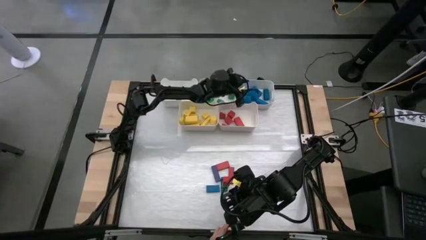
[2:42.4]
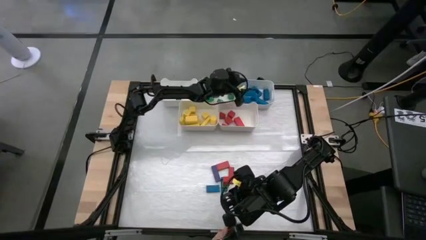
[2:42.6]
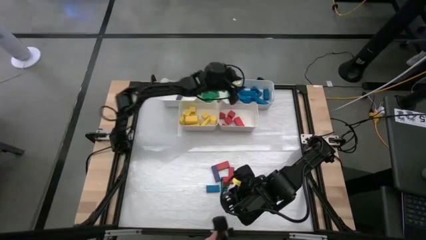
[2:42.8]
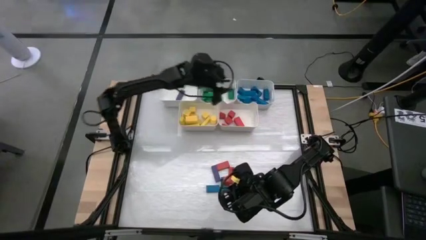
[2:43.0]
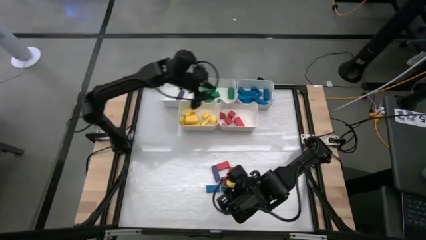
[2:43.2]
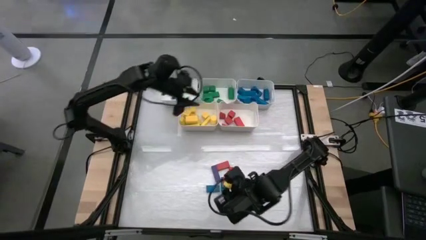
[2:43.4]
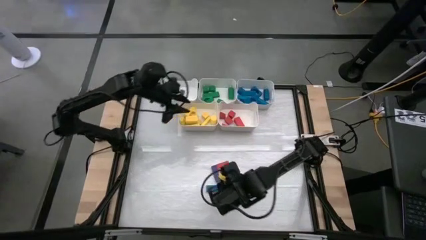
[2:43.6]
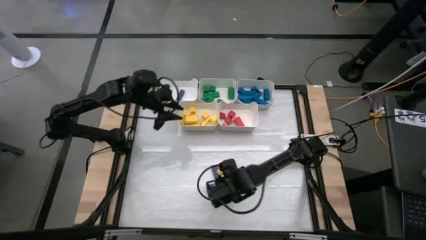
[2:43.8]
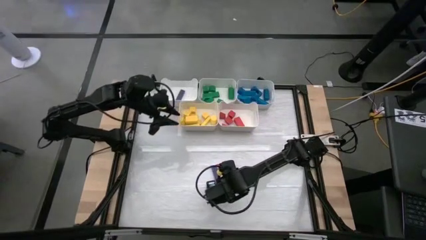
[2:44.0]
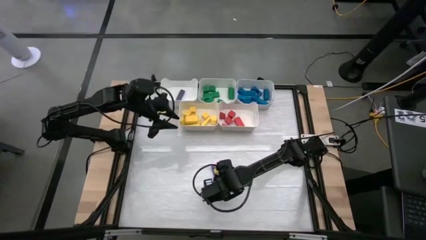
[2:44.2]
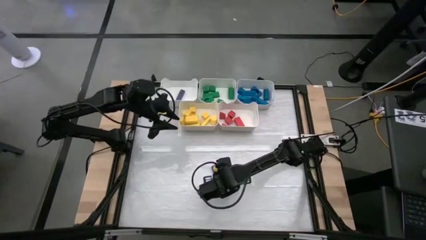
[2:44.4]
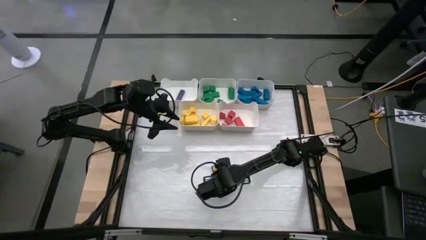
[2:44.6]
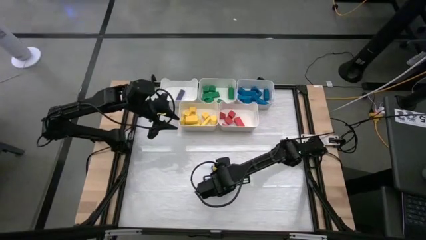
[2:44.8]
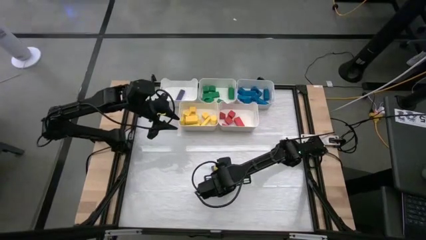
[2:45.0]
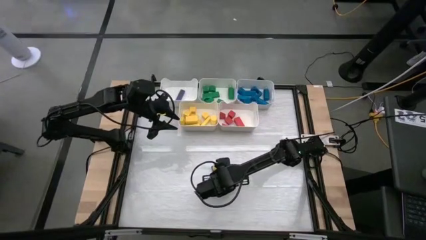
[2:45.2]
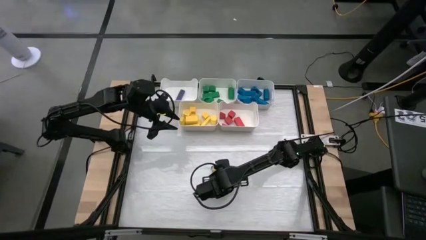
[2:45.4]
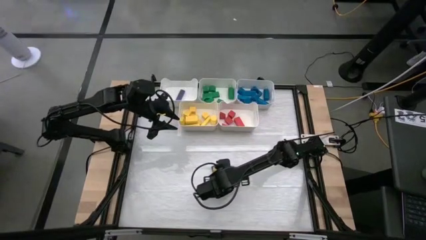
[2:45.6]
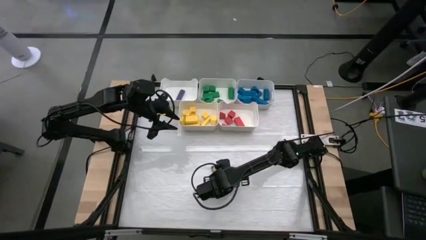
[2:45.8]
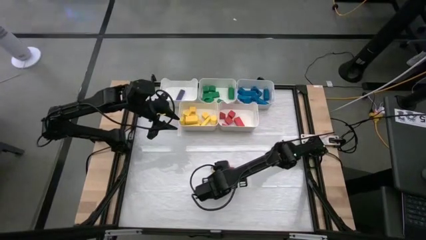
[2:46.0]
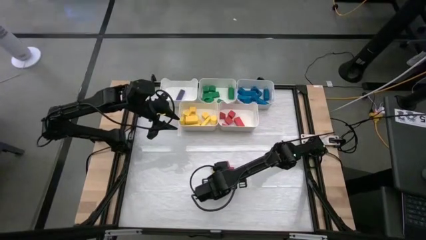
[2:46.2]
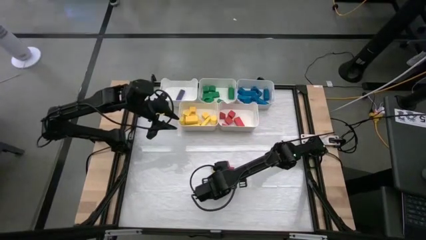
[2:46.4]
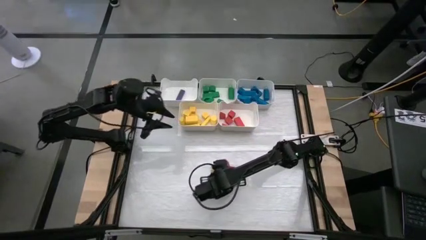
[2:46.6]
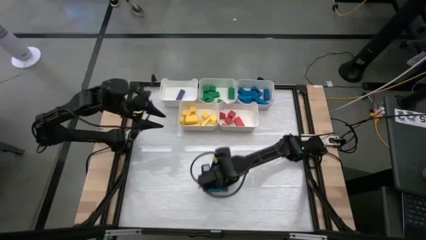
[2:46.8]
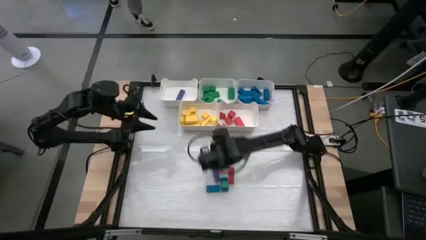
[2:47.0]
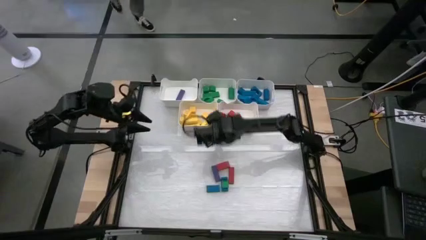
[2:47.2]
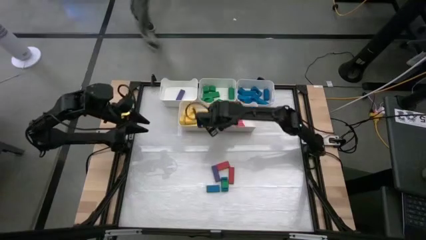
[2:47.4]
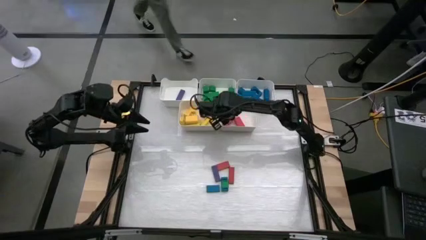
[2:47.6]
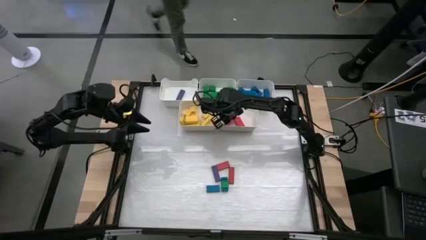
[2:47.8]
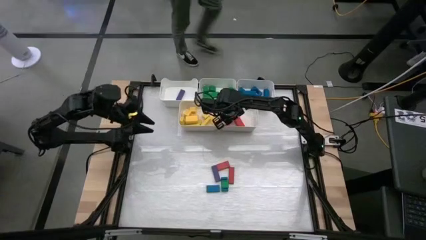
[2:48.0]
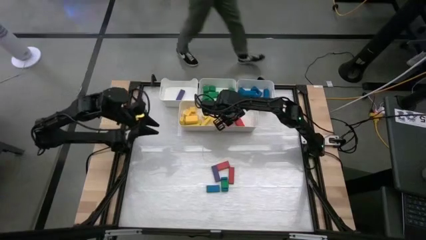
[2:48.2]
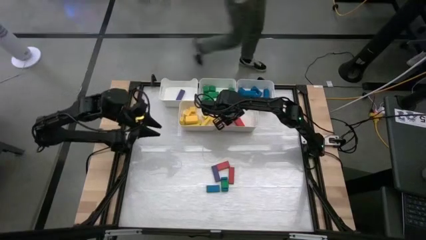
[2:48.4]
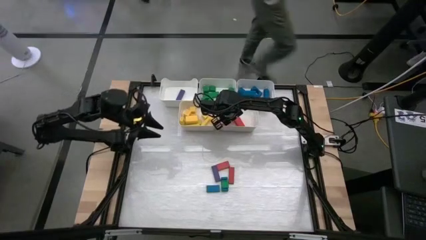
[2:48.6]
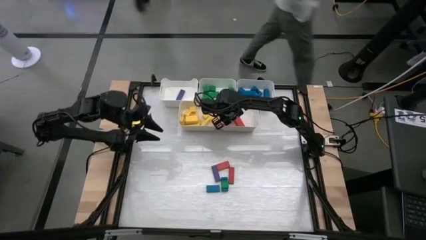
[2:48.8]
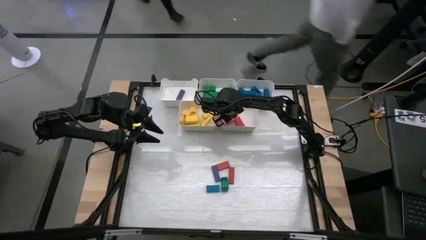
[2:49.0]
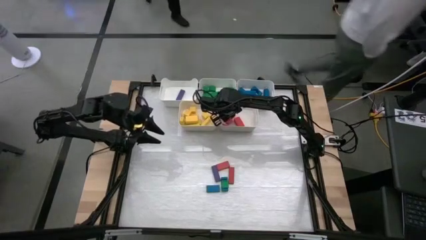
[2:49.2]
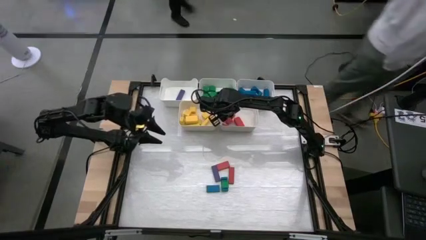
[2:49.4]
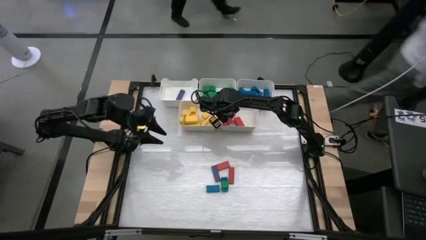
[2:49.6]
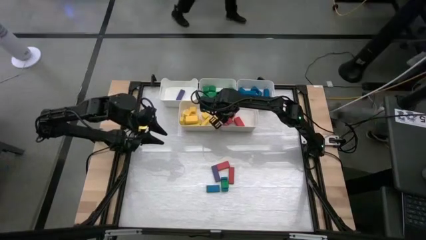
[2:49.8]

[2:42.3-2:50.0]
Task: Sort blocks
Put the red block into the bottom right bin

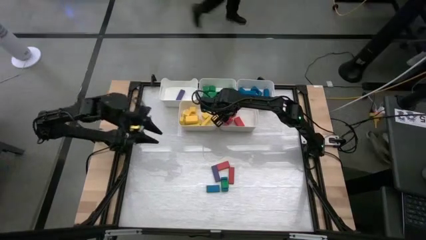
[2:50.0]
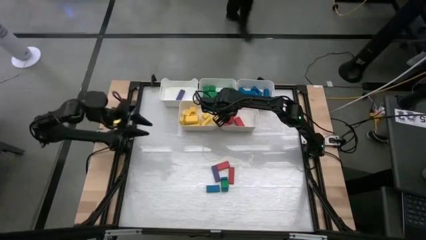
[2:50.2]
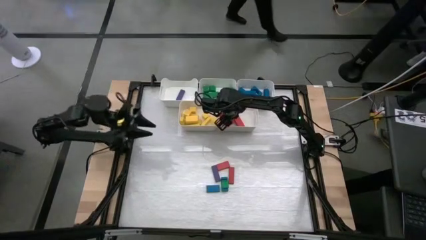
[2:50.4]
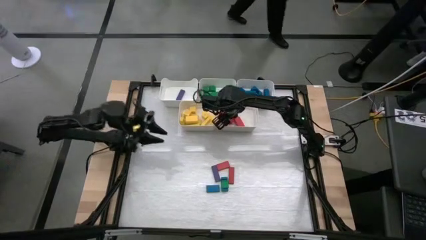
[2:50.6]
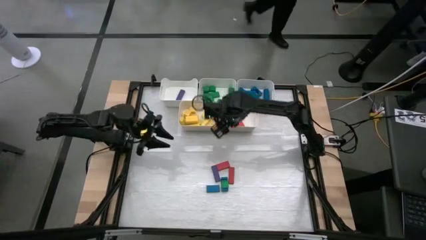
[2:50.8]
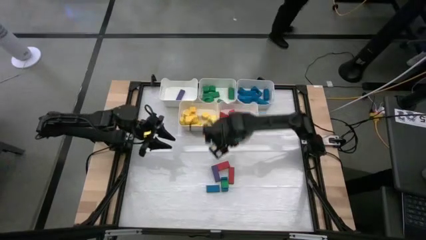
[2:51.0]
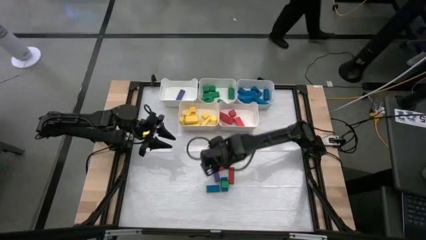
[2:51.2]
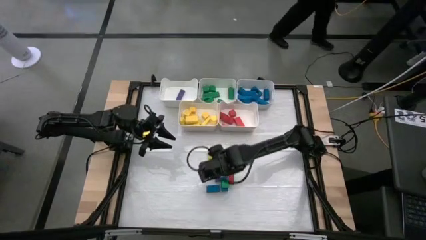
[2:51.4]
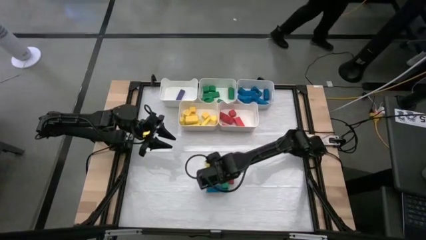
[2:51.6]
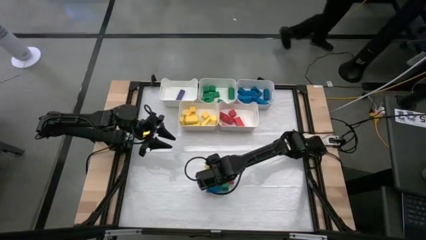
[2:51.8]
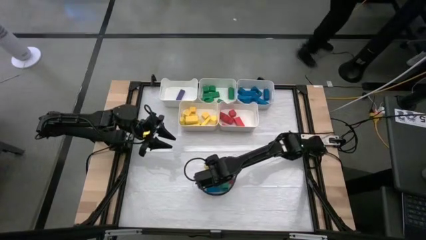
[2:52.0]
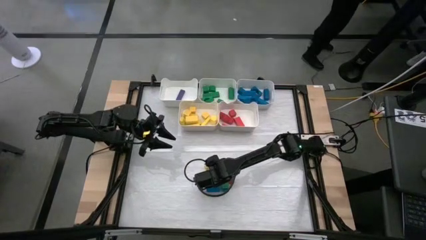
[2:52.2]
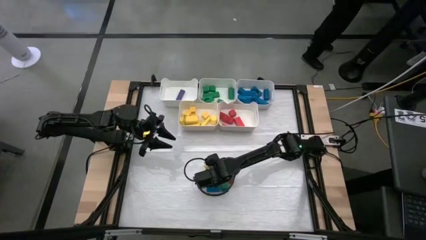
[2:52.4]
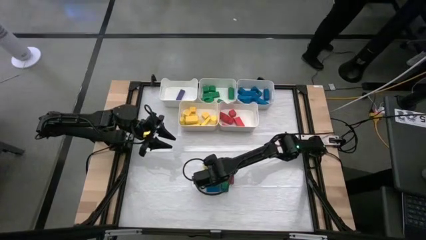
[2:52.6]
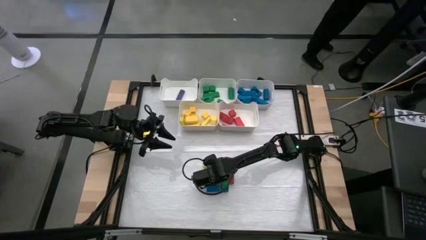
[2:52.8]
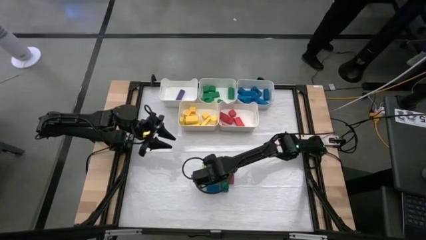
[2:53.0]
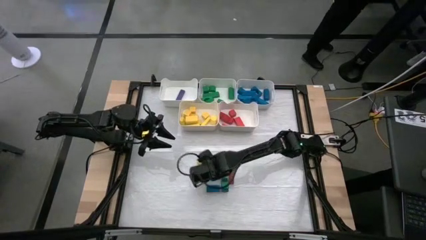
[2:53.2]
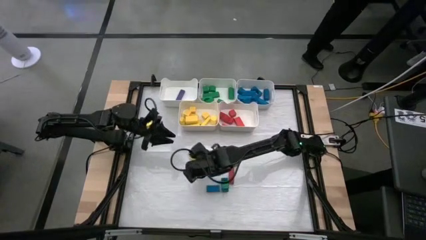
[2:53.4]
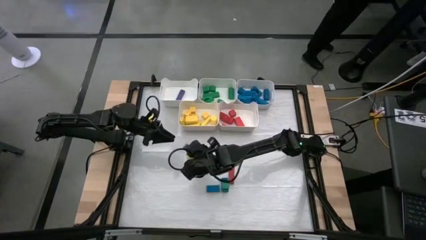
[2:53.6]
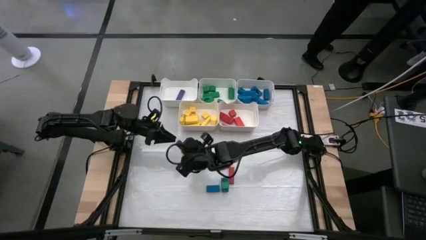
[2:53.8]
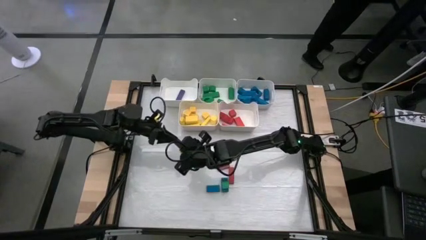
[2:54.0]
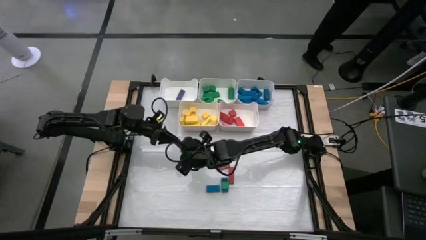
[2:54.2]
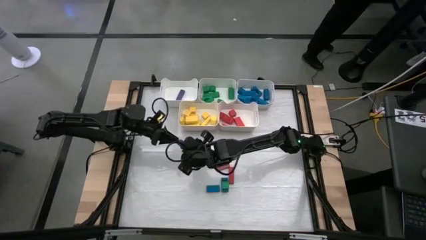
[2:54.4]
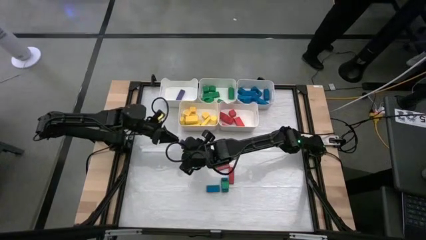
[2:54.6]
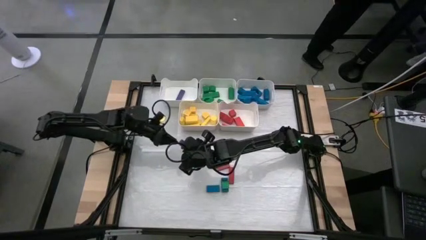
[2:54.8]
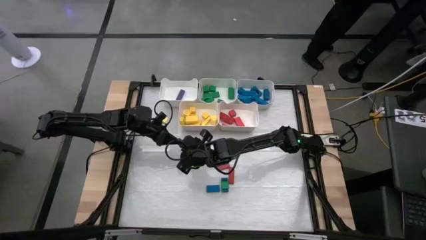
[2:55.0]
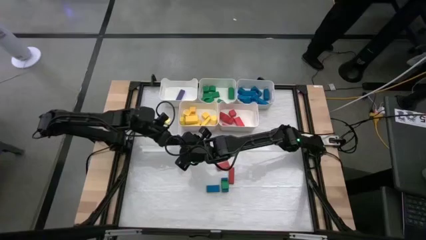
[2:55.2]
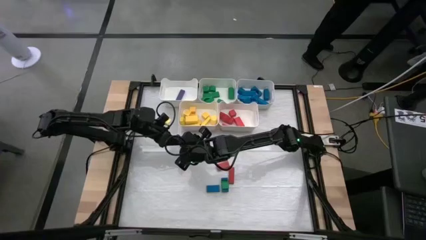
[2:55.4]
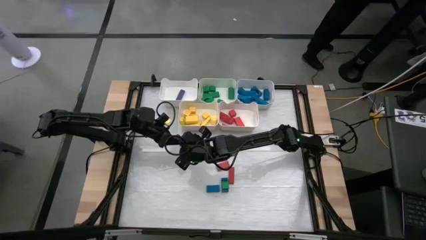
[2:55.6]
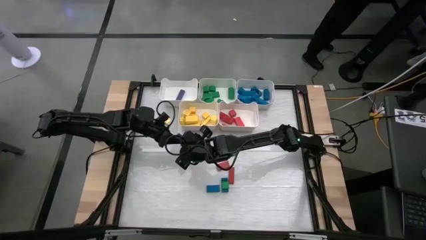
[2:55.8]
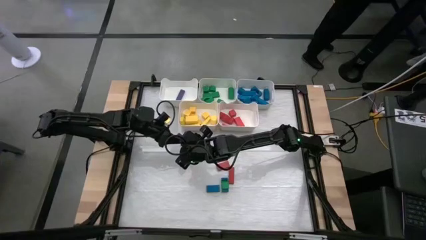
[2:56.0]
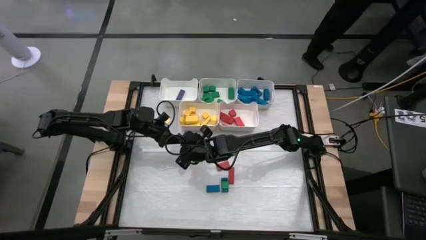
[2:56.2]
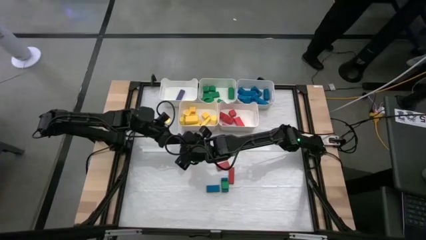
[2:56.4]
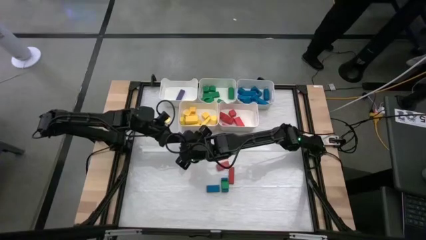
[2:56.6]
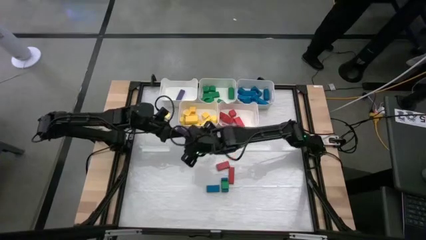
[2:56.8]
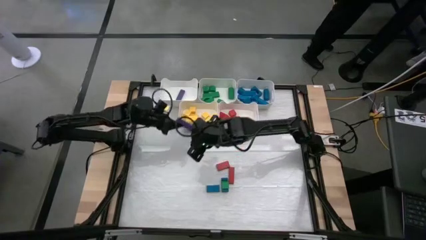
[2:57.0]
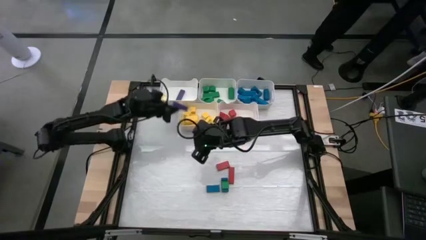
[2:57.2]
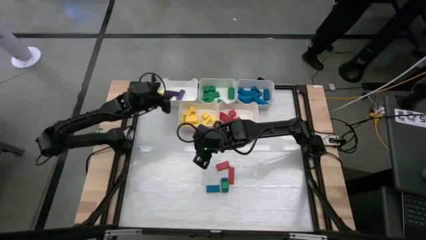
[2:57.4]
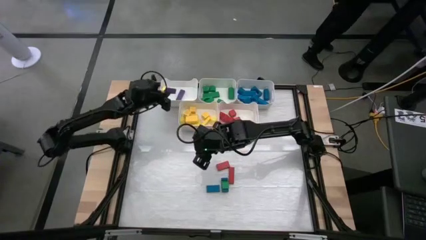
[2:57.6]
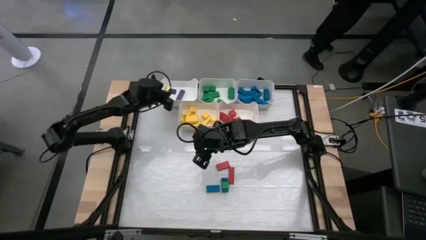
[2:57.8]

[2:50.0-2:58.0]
Put the violet block into the top left bin

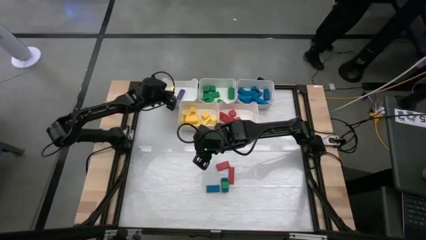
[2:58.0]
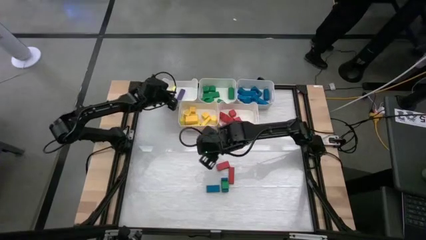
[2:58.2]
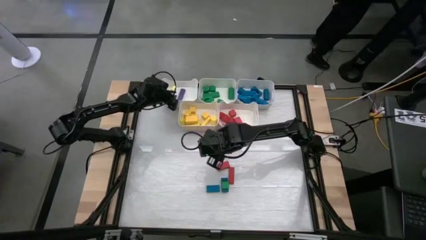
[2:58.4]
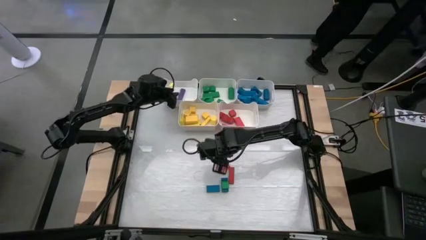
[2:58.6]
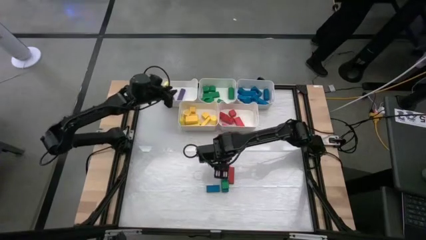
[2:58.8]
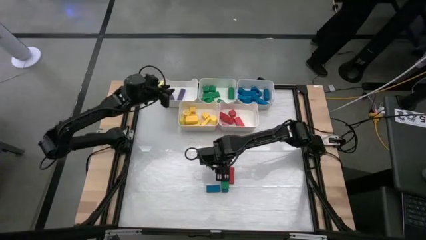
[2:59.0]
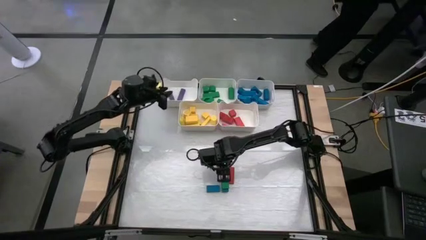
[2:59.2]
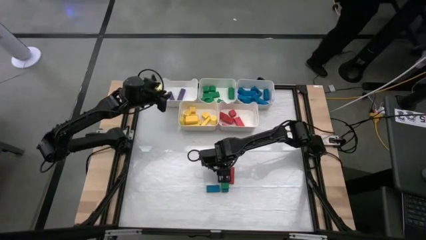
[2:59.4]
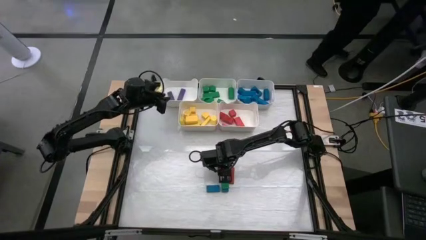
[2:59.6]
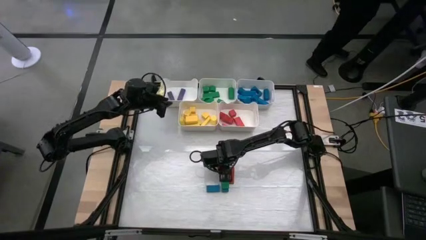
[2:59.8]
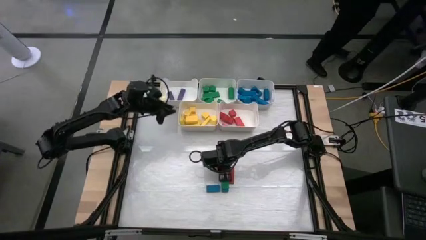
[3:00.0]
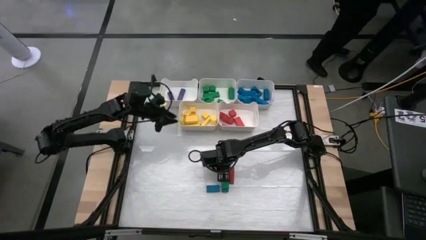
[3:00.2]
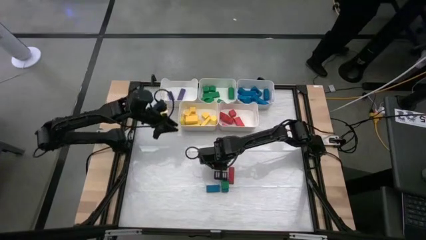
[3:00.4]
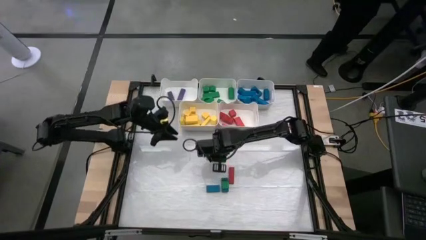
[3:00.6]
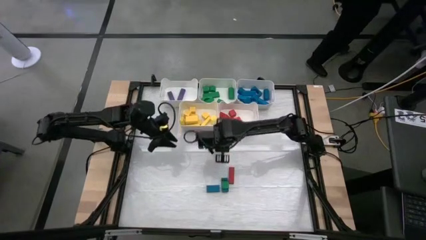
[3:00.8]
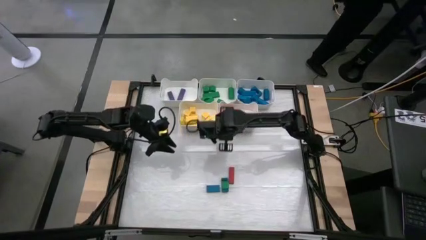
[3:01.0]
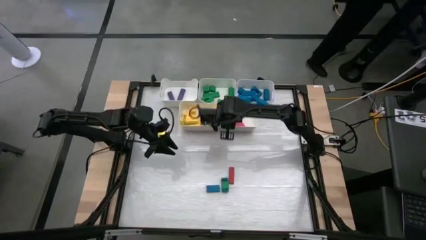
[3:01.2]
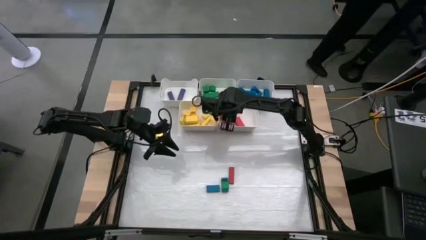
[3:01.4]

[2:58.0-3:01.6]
Put the red block into the bottom right bin
